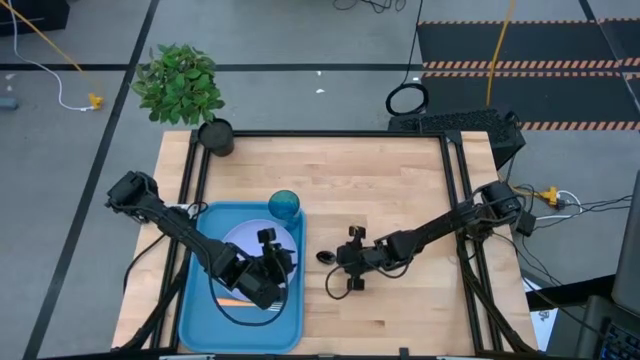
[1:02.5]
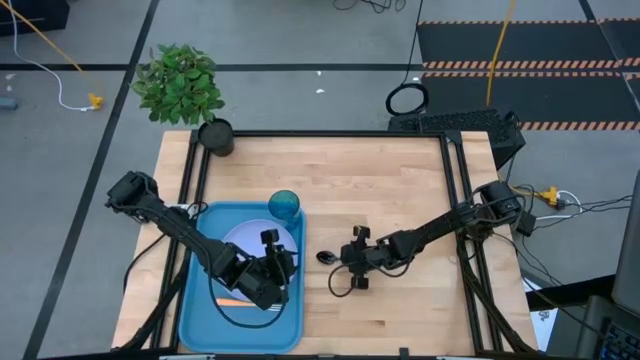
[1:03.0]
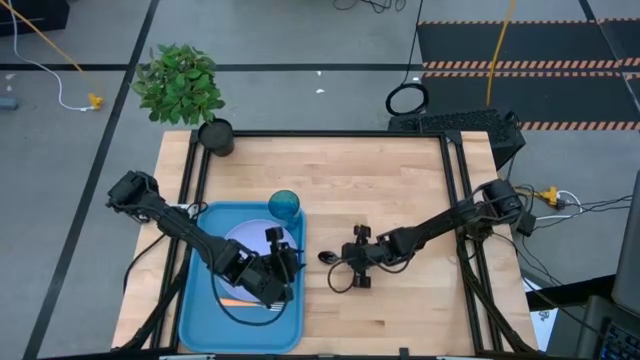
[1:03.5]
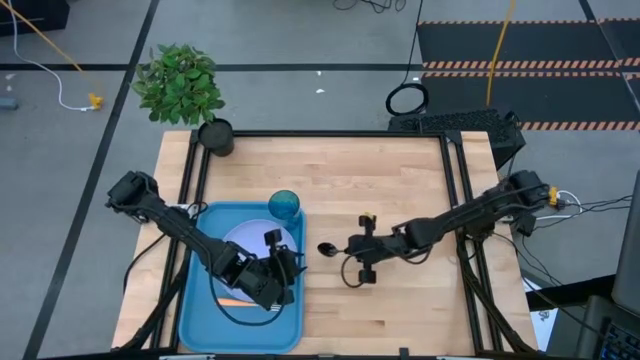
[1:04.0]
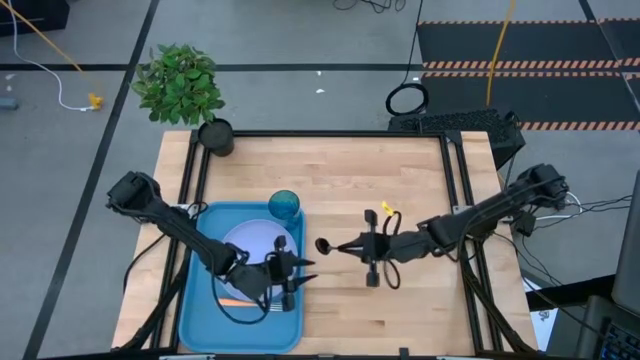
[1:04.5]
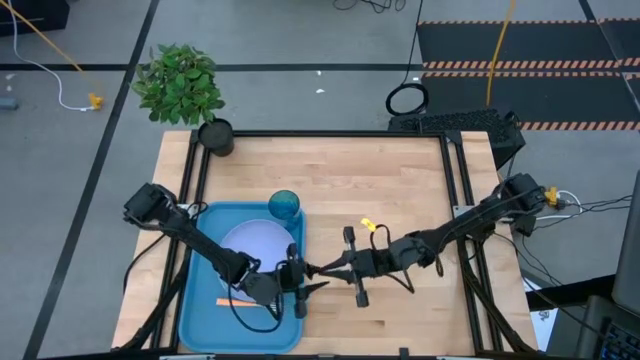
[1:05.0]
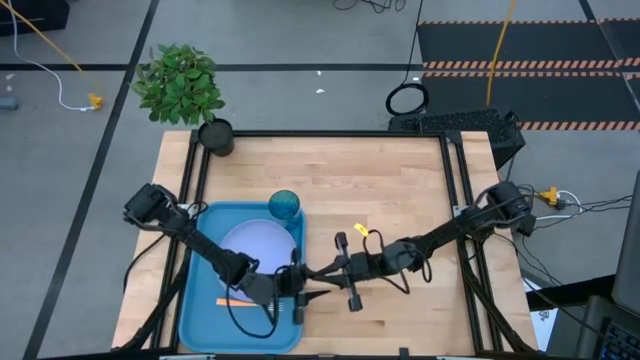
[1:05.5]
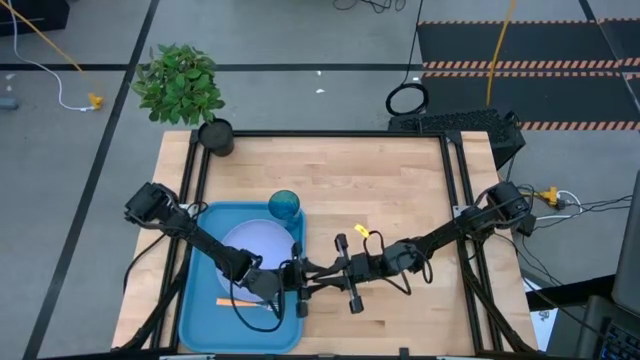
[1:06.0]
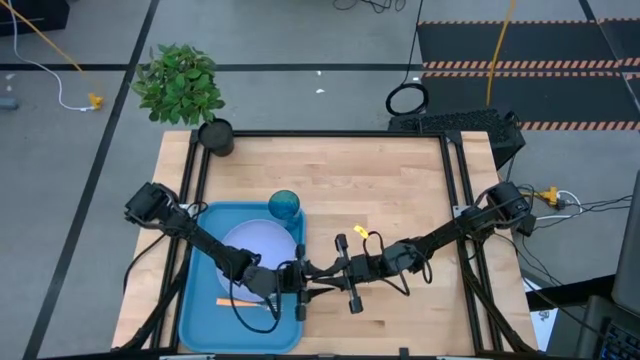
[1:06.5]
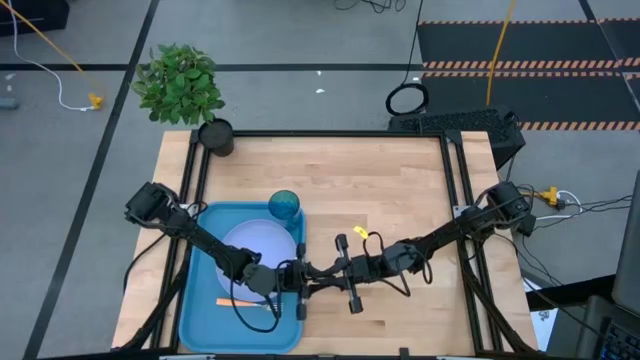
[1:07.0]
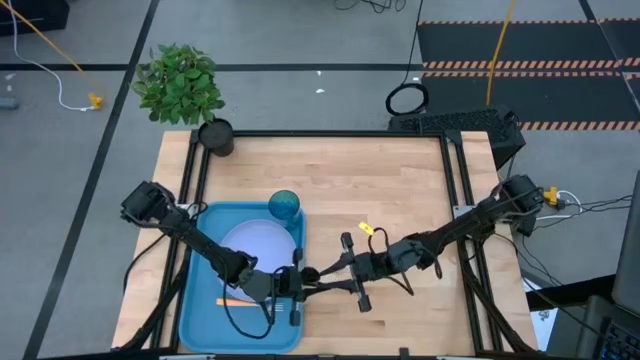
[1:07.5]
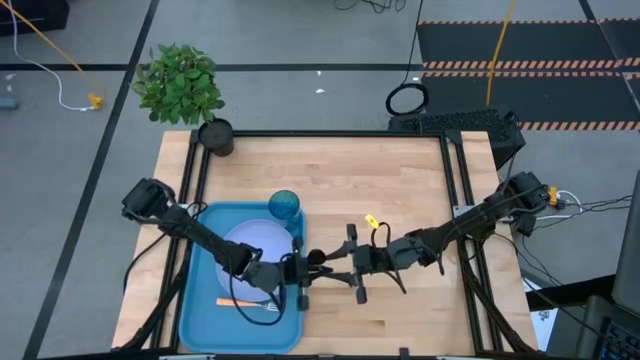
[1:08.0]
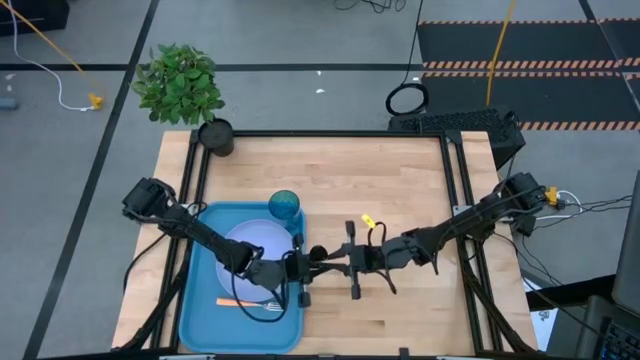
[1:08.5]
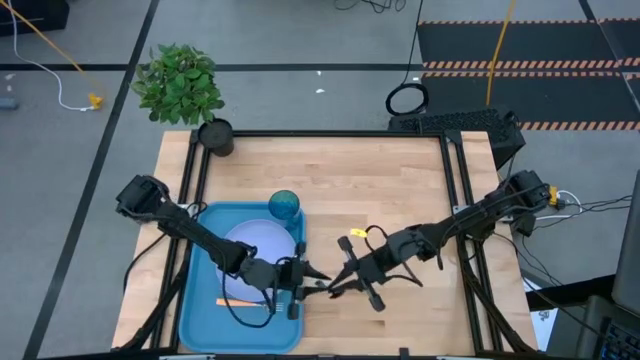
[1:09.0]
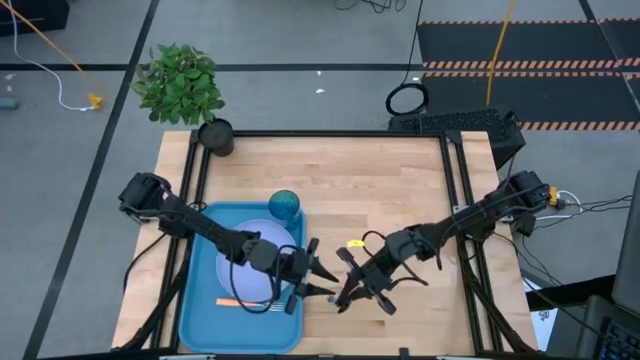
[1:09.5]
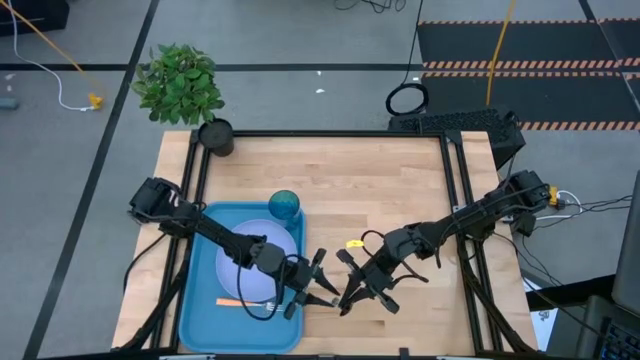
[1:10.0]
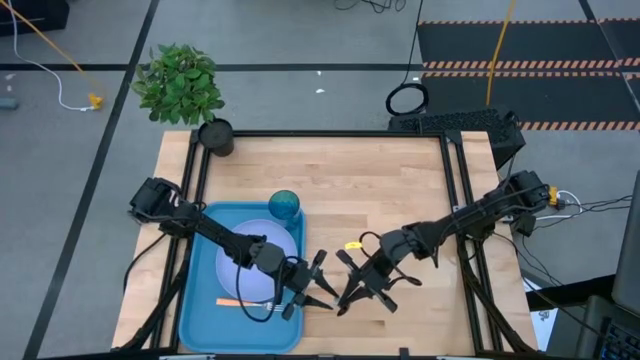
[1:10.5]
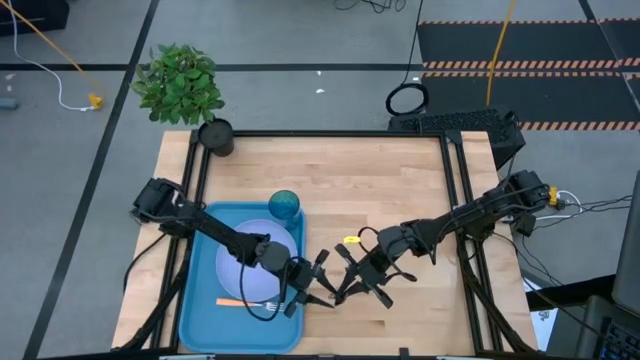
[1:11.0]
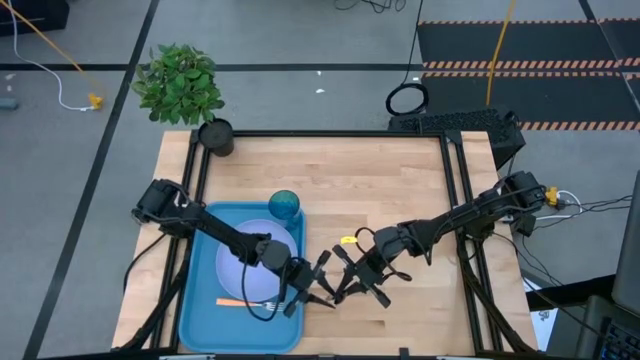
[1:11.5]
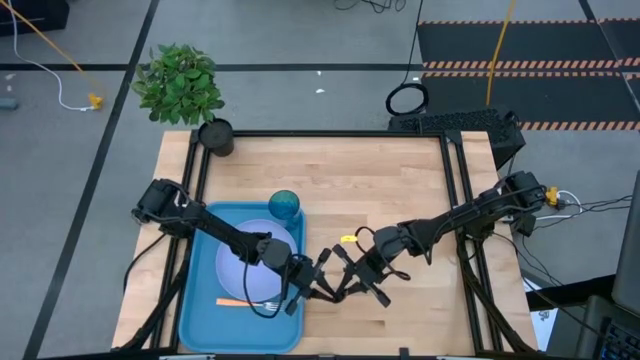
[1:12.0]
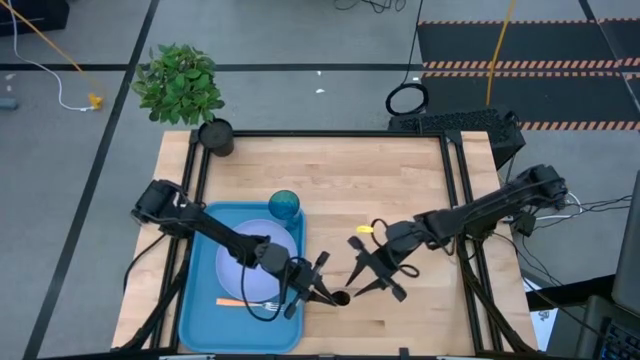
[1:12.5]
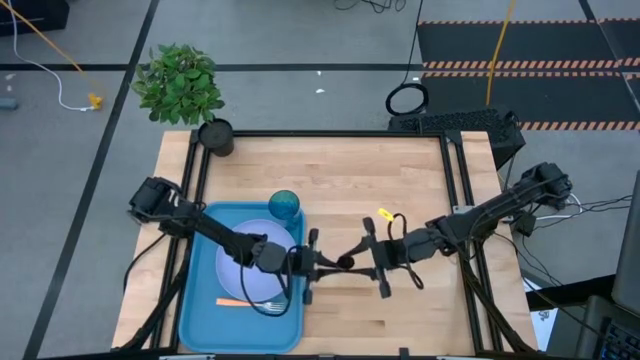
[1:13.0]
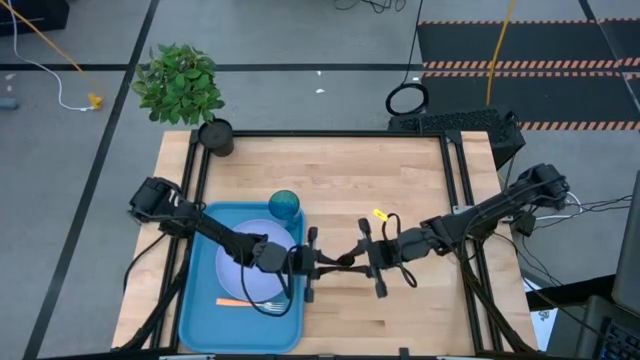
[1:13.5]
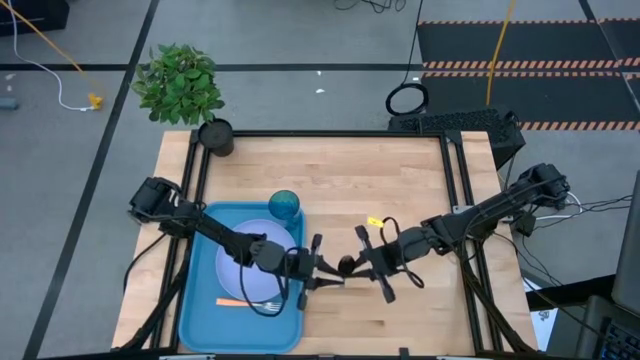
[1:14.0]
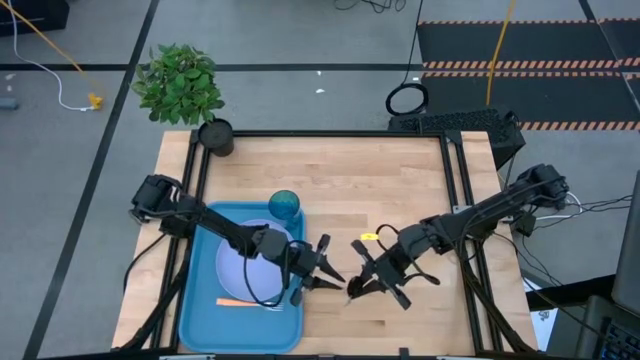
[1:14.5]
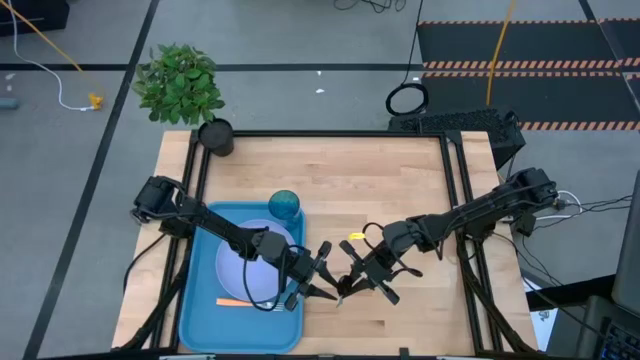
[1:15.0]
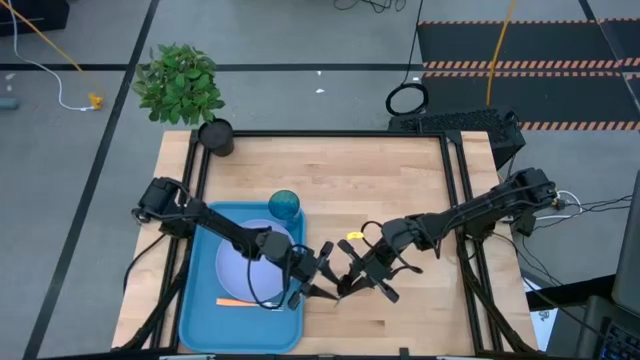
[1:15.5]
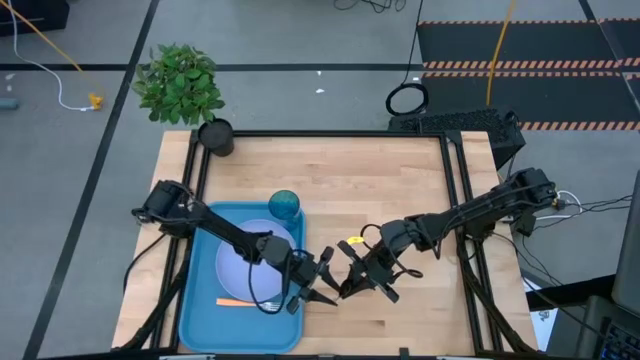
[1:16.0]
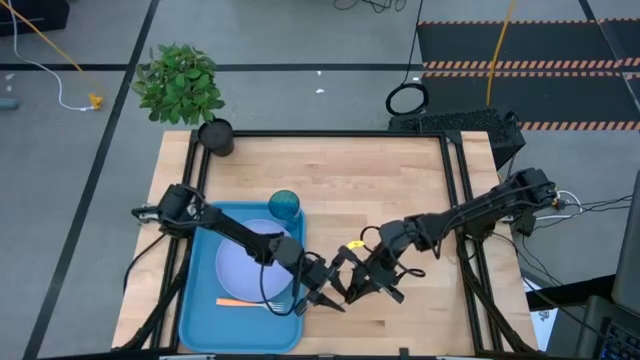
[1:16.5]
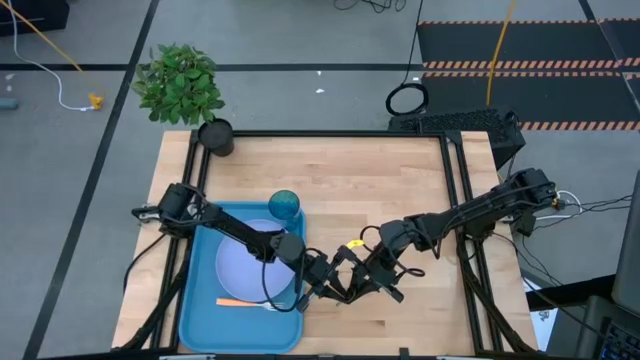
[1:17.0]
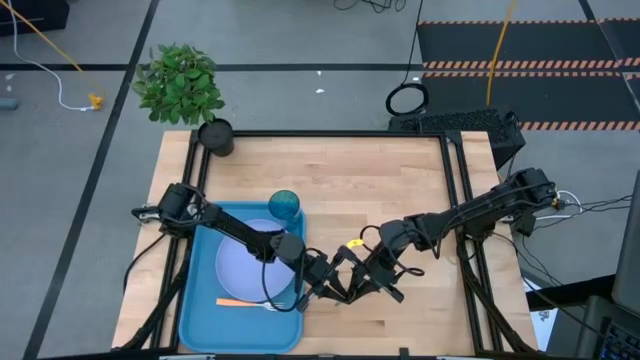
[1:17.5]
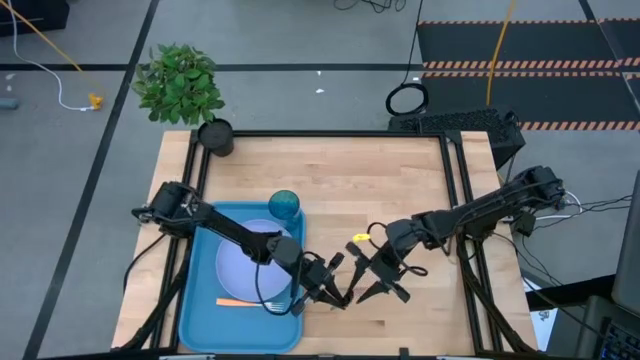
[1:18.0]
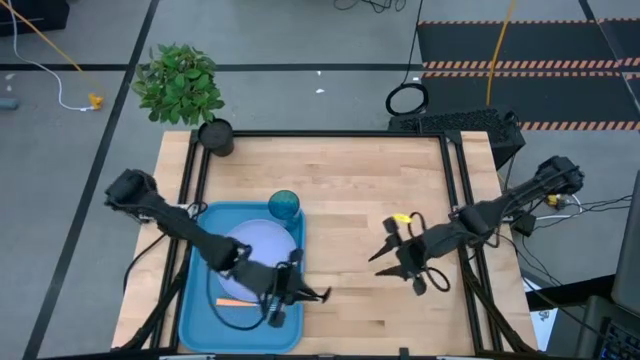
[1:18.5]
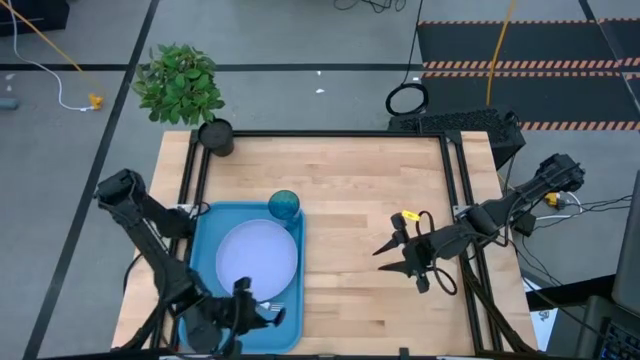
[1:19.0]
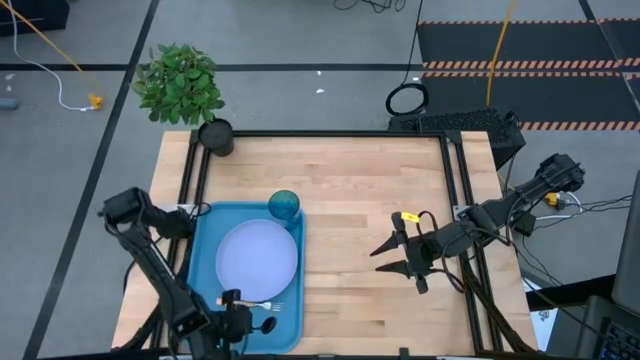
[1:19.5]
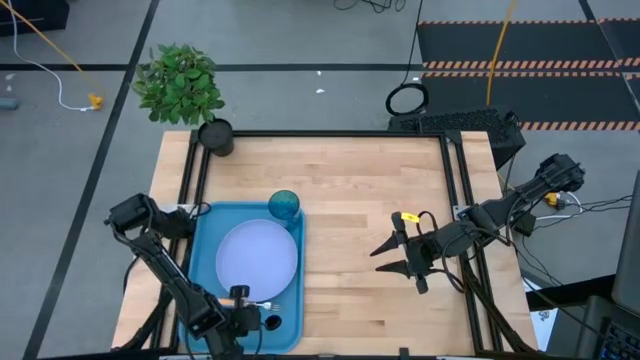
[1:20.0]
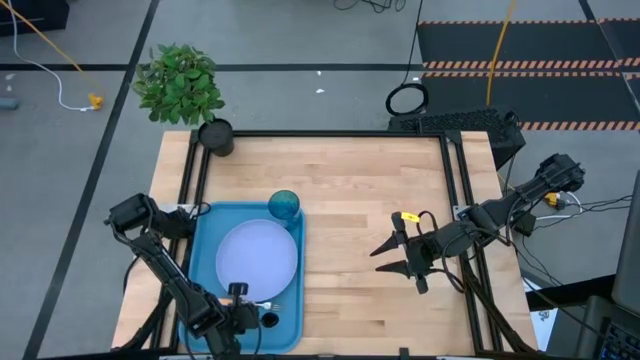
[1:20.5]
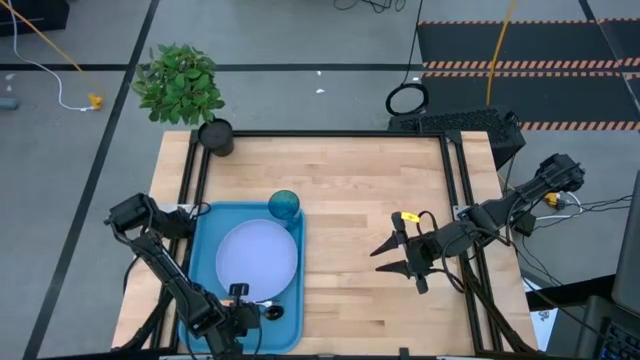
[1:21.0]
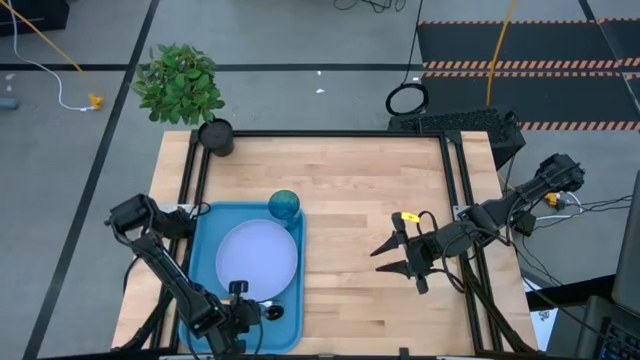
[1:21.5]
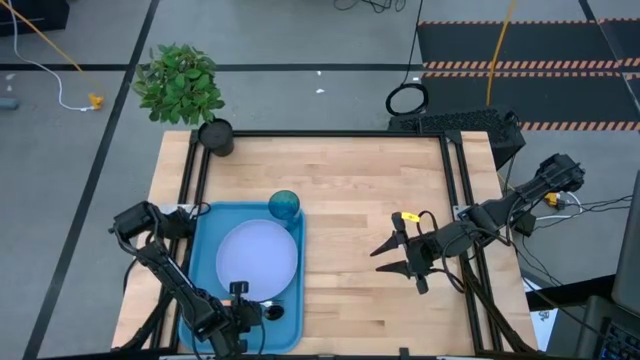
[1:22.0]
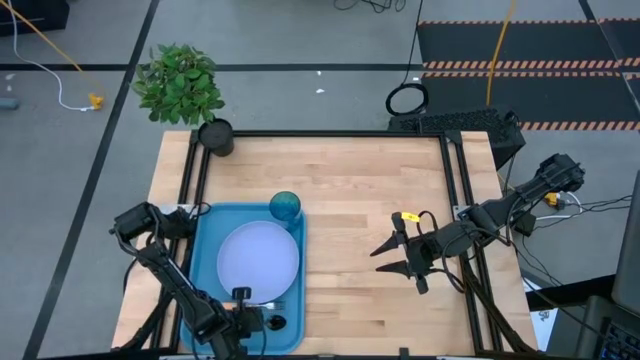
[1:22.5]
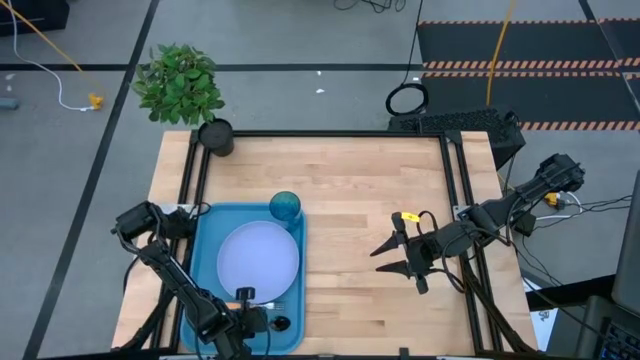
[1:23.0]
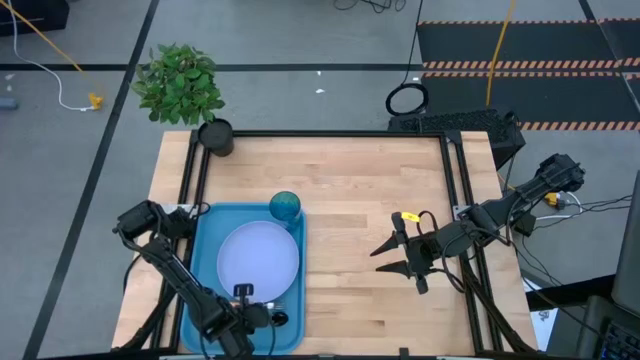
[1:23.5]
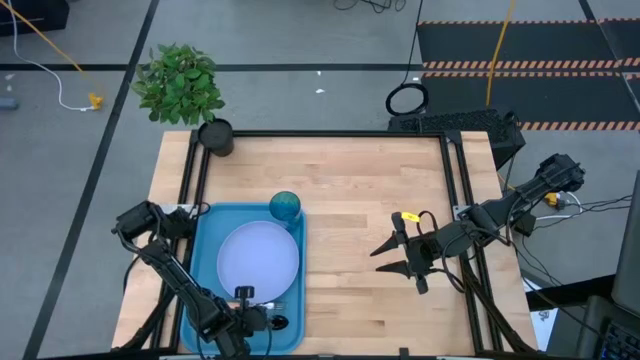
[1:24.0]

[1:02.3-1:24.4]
Task: Pick and place plate/cup/fork/spoon on tray
Put the blue spoon to the right of the yellow fork on the blue tray
